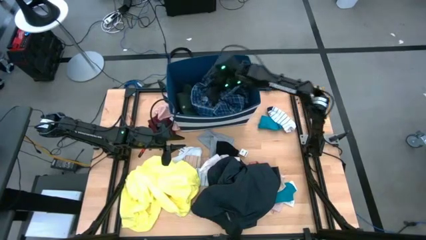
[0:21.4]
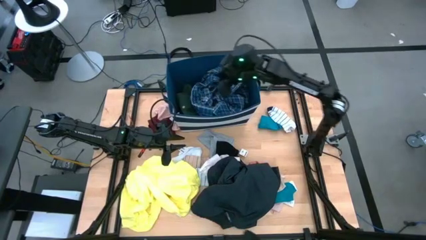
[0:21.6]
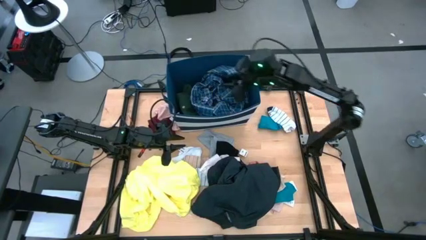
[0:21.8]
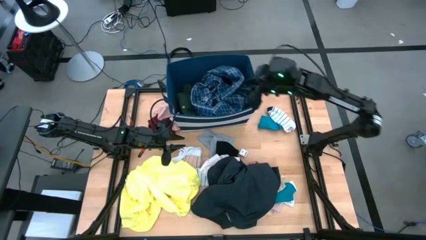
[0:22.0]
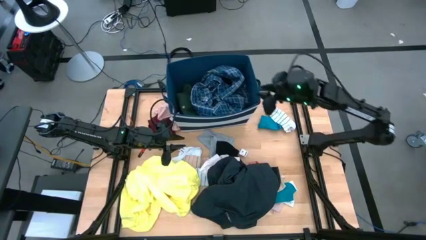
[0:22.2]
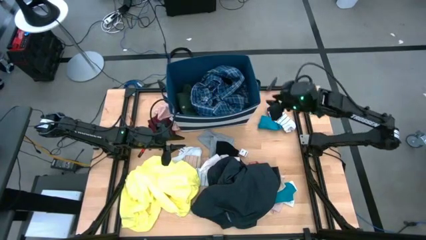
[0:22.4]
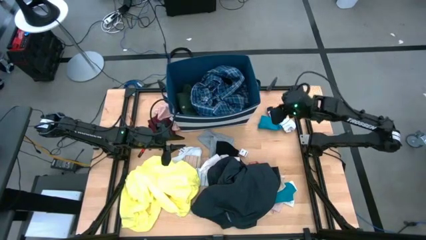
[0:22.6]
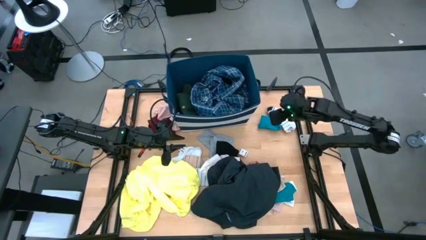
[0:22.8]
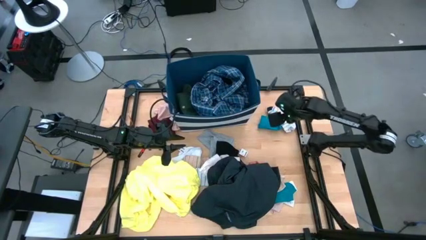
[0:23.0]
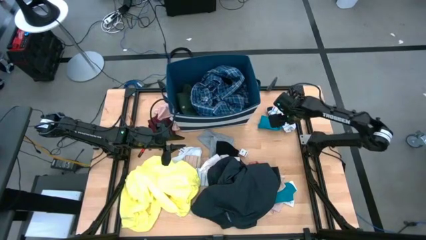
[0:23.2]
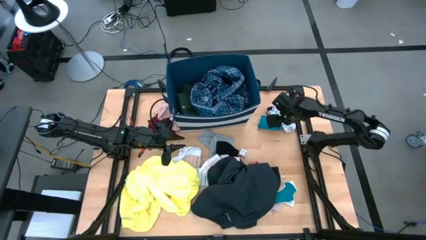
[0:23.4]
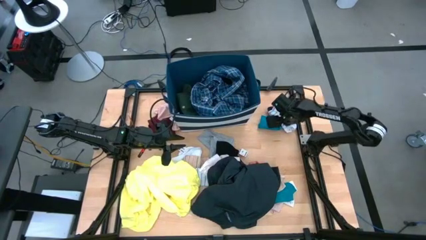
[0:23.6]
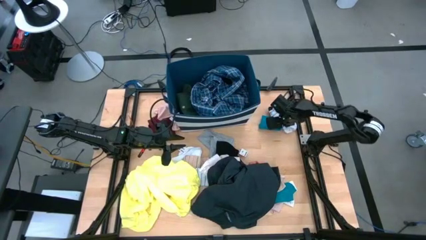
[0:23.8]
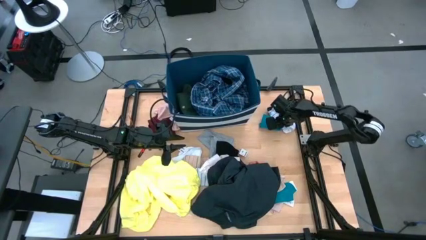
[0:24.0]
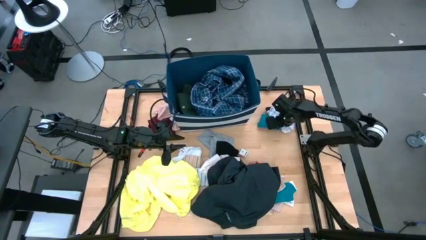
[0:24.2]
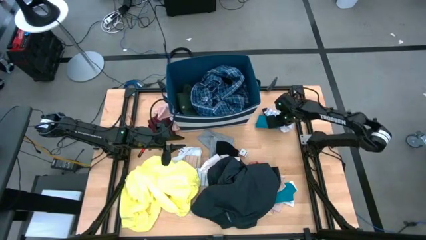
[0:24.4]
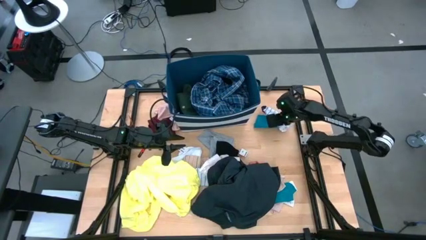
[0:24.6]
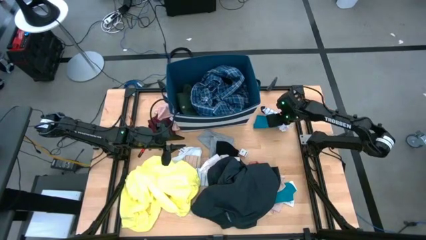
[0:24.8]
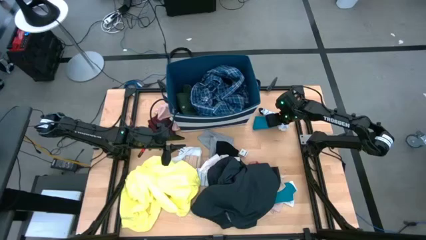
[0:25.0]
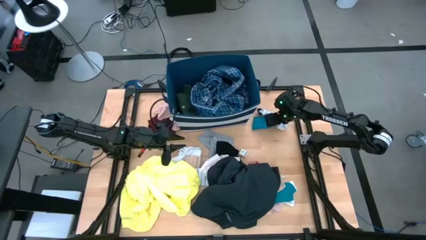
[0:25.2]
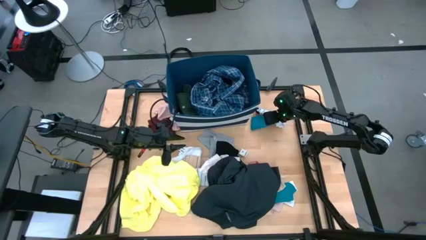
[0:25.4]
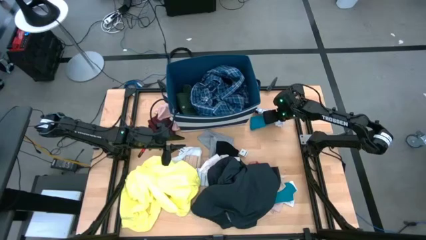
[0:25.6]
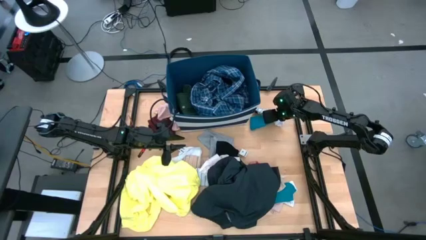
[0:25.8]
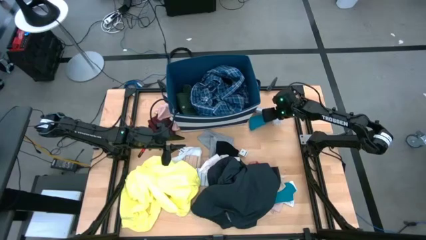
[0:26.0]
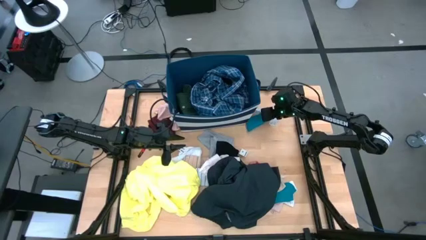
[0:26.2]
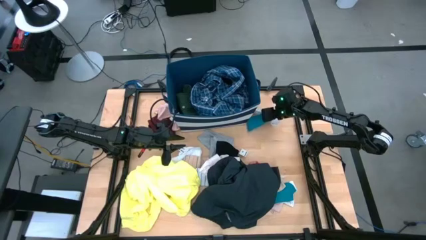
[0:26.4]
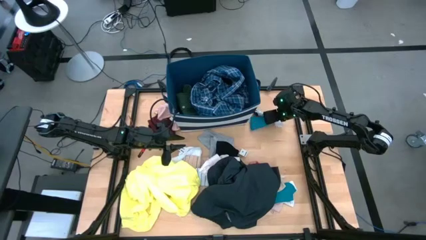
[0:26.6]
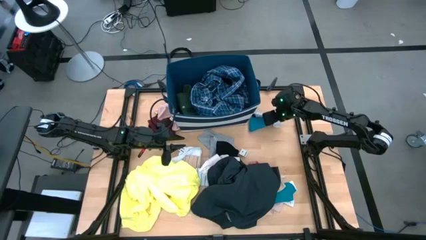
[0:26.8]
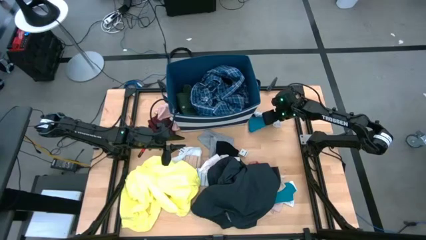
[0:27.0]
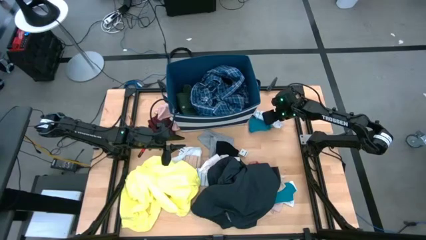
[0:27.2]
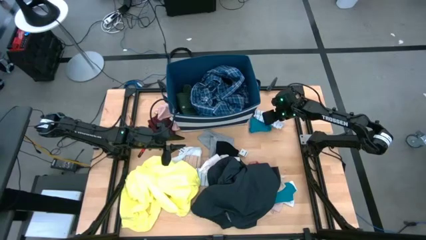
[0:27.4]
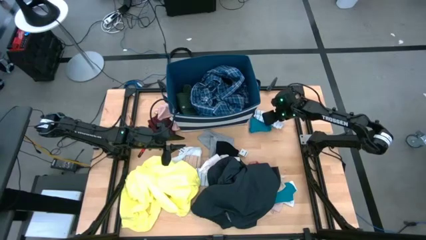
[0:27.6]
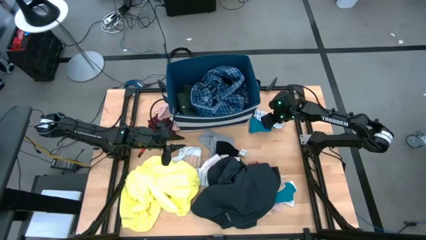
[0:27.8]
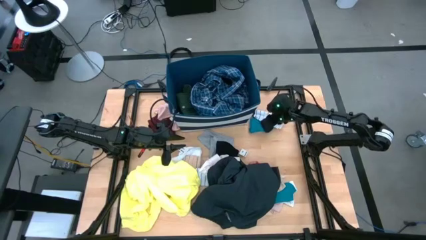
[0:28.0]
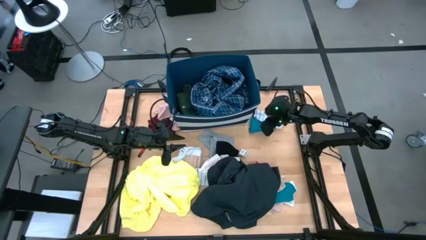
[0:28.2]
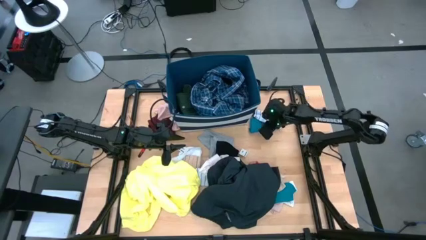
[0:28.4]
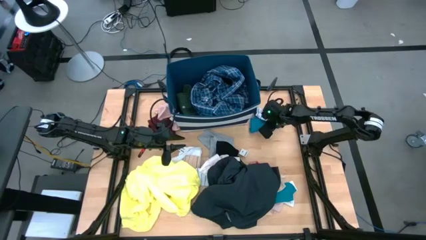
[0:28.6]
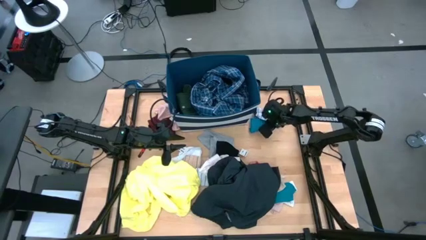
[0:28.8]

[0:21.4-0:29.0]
Task: Sort clothes
Put the top white patterned sock into the blue laundry bin

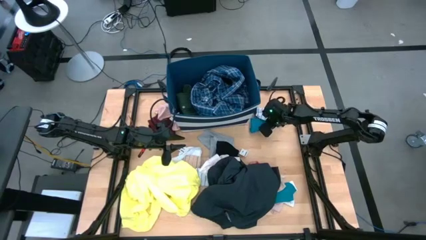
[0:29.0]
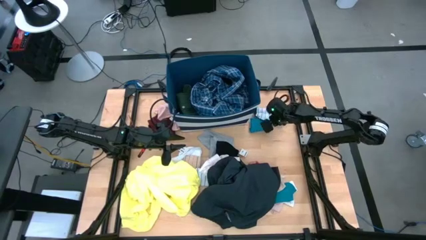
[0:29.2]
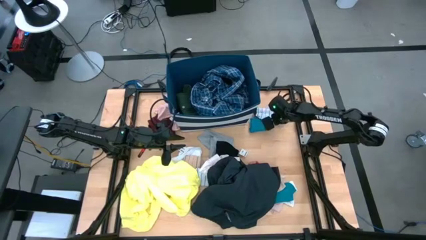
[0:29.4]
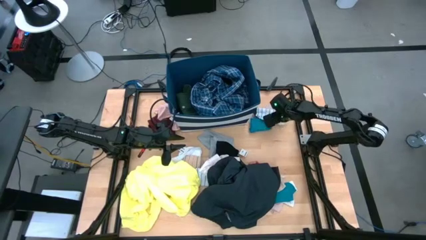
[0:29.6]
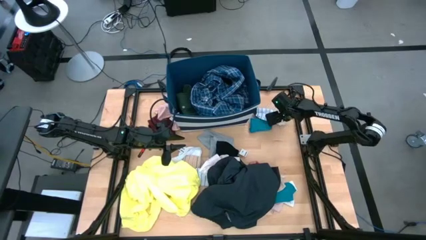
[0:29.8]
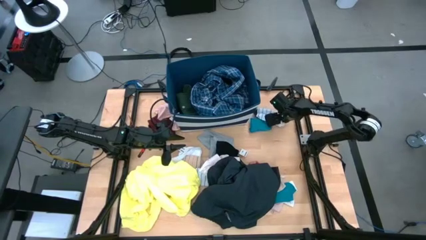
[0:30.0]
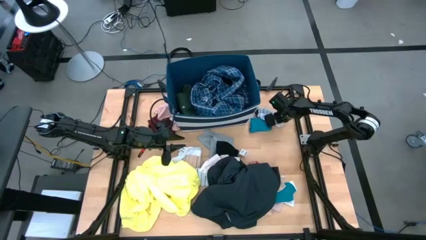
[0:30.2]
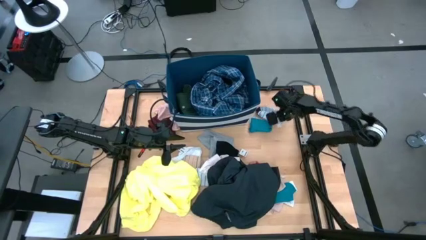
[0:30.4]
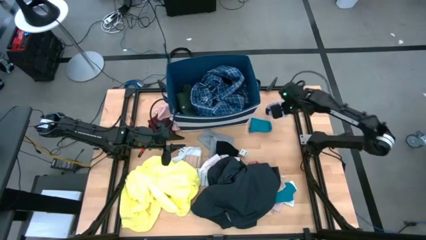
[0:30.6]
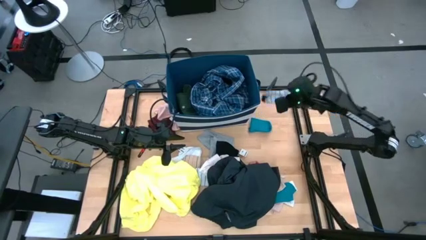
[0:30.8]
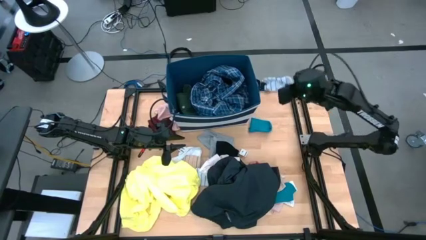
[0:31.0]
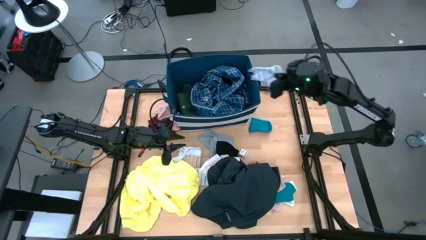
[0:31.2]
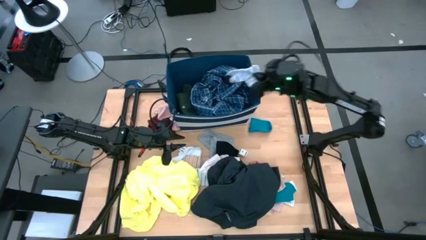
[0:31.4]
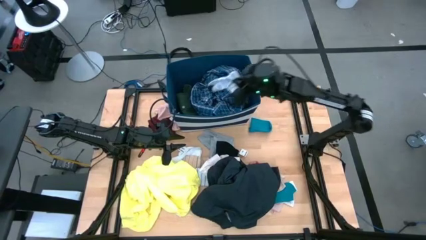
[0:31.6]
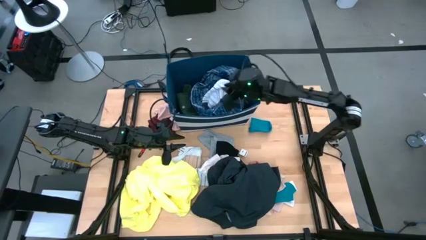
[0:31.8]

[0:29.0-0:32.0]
Put the top white patterned sock into the blue laundry bin
